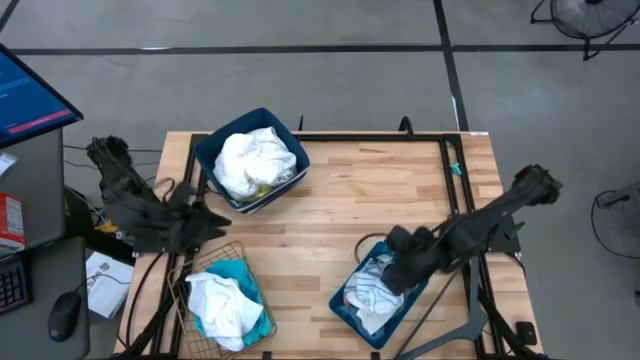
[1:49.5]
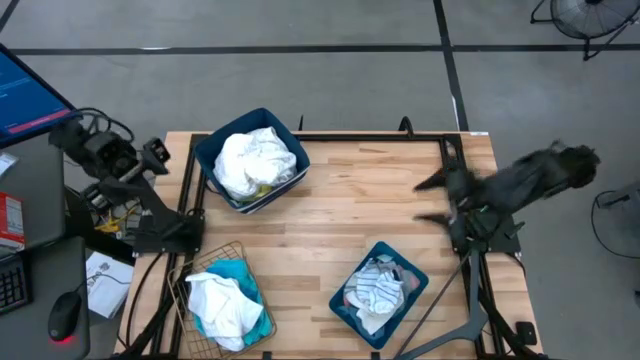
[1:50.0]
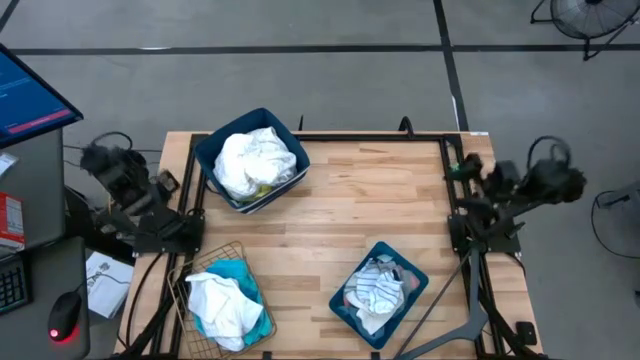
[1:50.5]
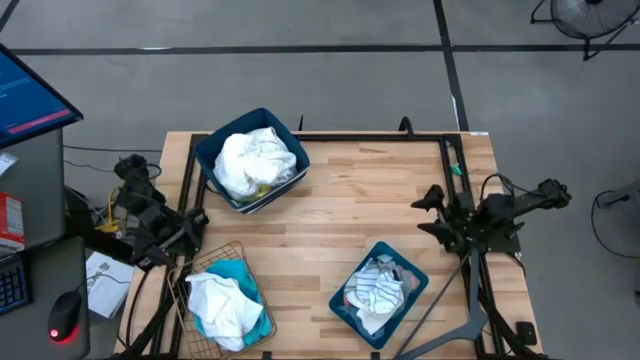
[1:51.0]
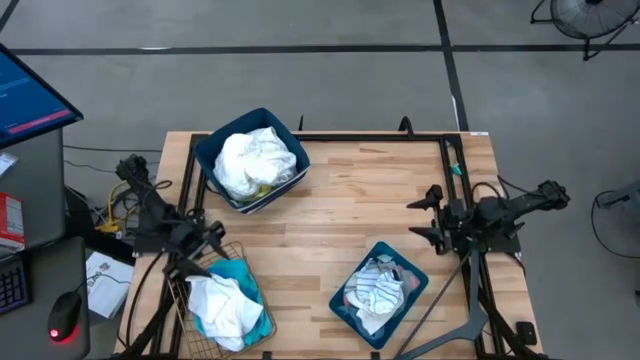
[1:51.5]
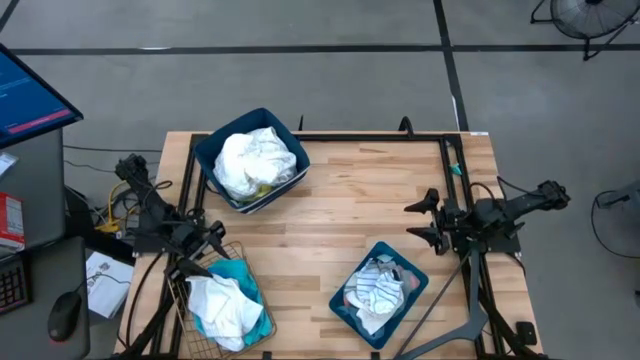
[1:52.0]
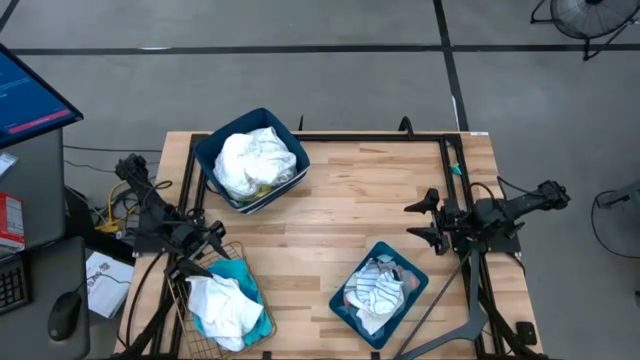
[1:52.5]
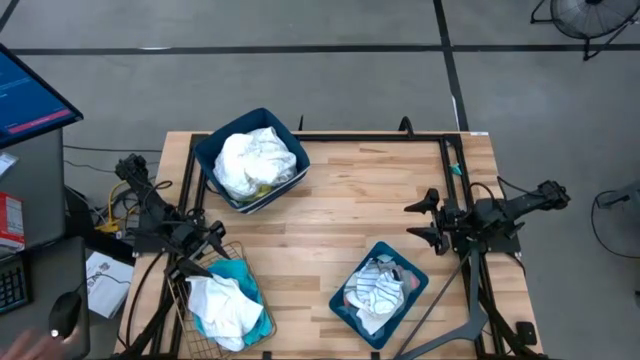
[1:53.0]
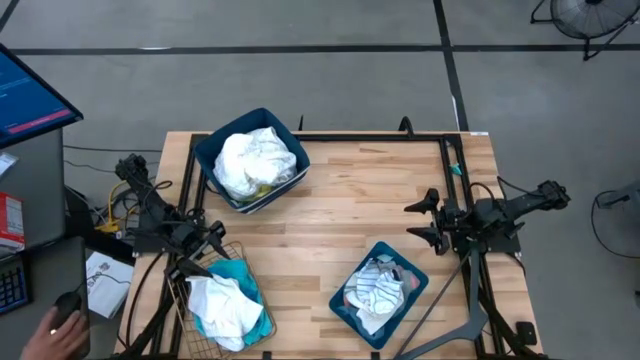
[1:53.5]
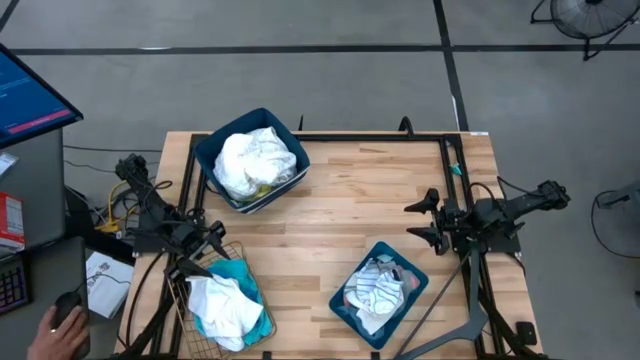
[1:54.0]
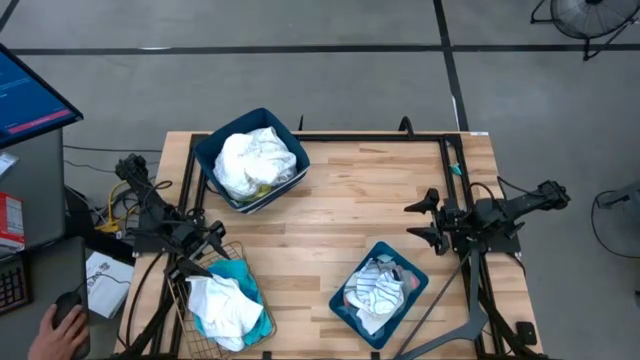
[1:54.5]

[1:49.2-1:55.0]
Task: Pick & Place Cloths
Return to Home Position

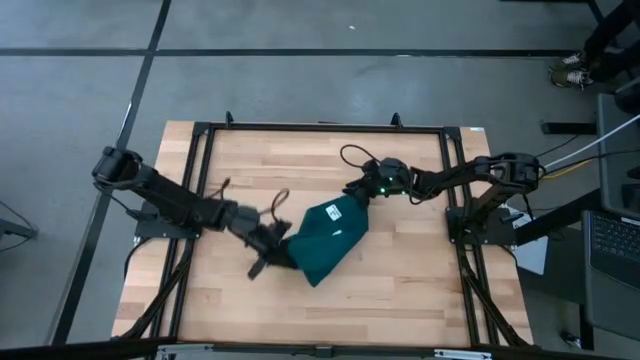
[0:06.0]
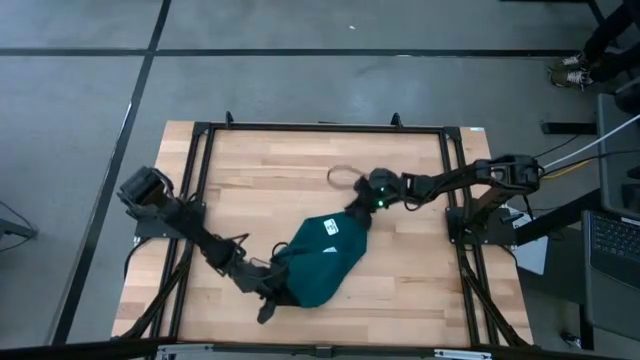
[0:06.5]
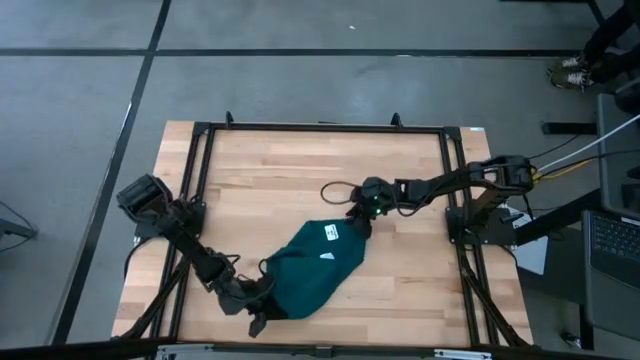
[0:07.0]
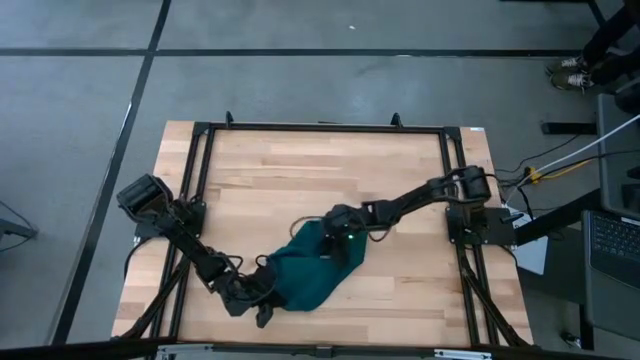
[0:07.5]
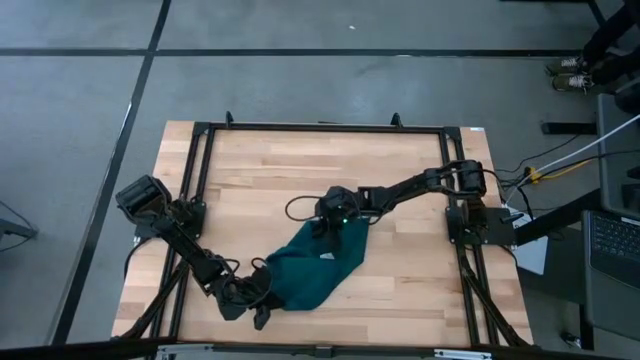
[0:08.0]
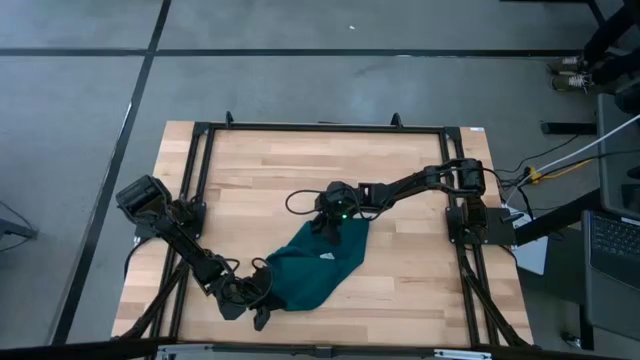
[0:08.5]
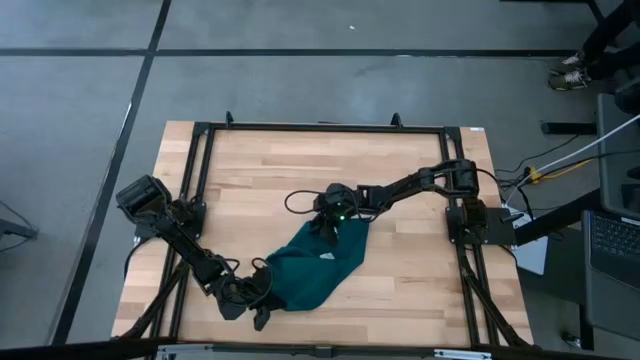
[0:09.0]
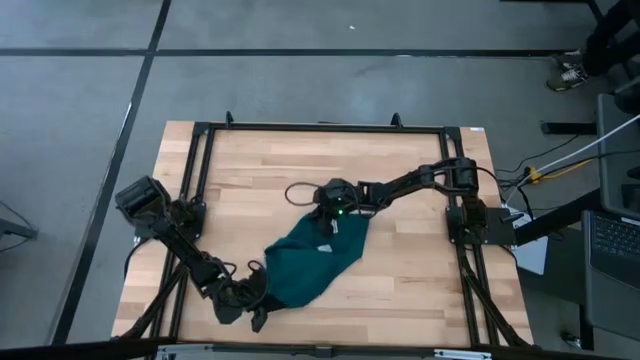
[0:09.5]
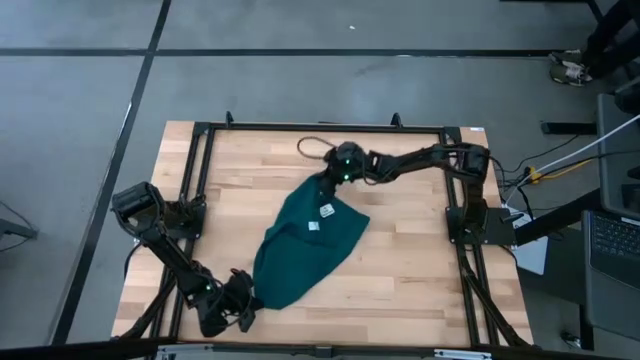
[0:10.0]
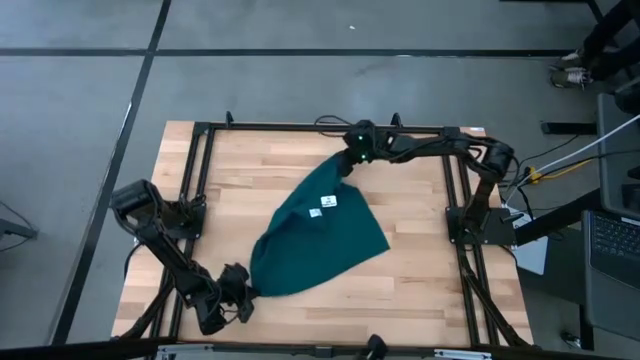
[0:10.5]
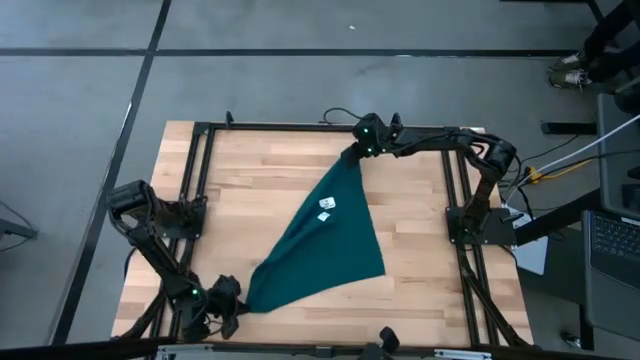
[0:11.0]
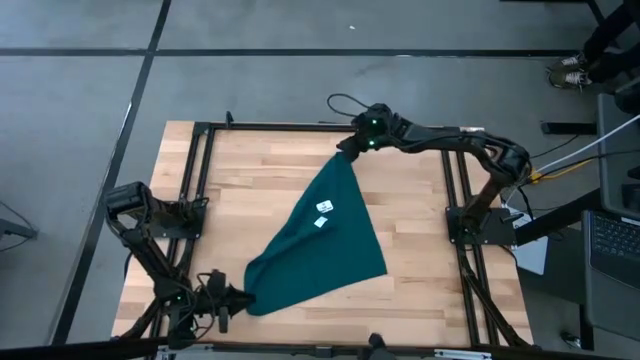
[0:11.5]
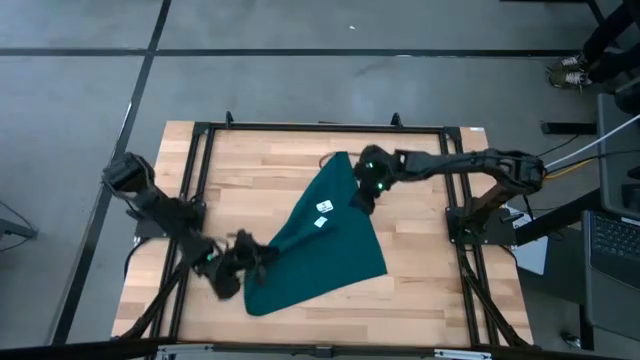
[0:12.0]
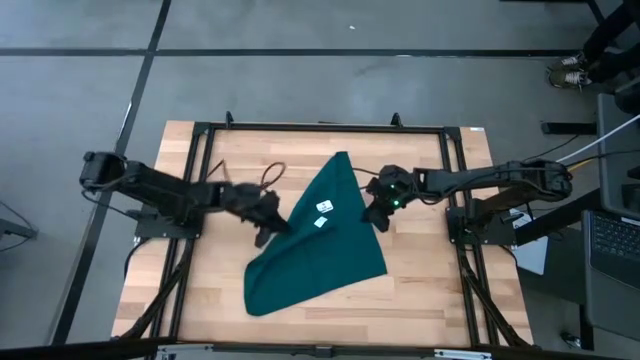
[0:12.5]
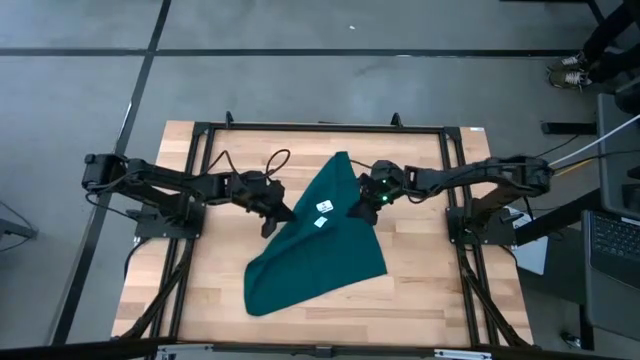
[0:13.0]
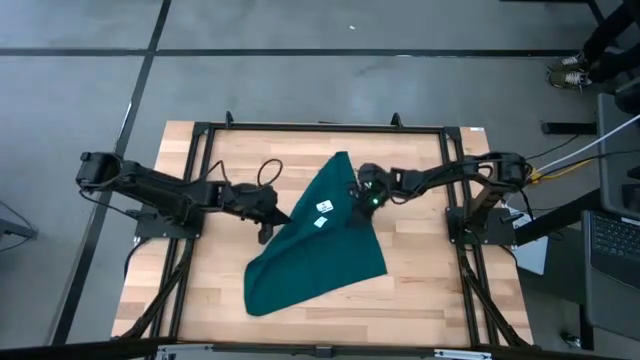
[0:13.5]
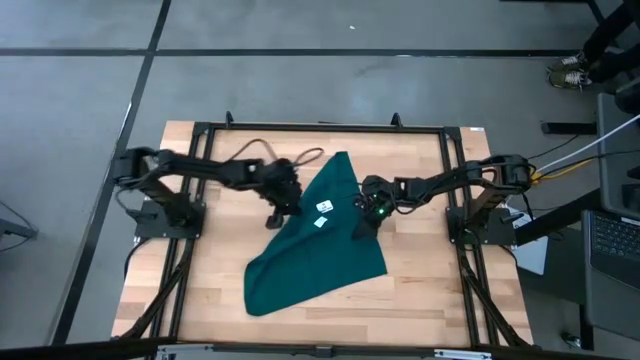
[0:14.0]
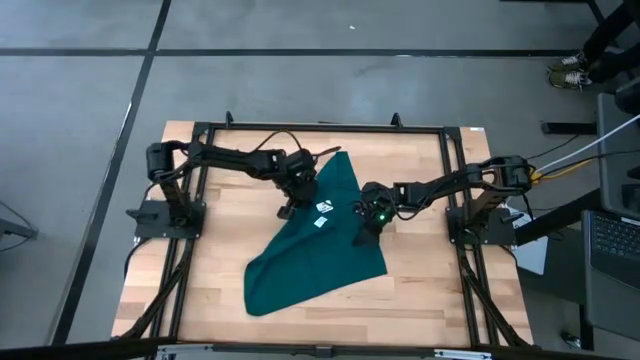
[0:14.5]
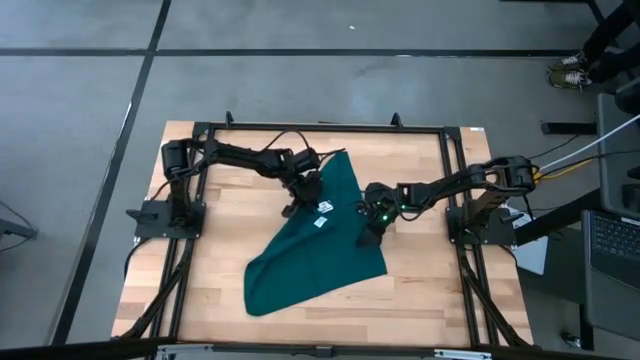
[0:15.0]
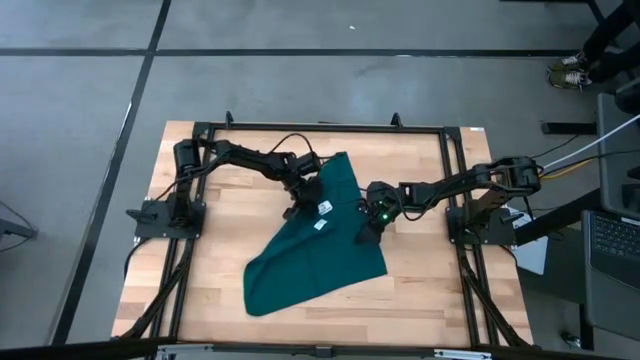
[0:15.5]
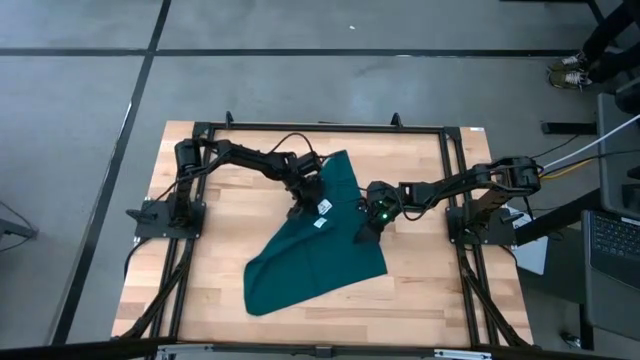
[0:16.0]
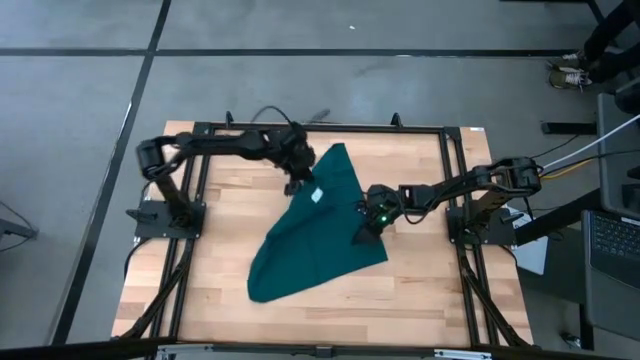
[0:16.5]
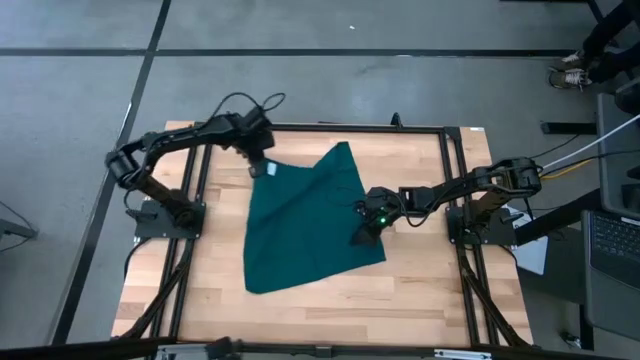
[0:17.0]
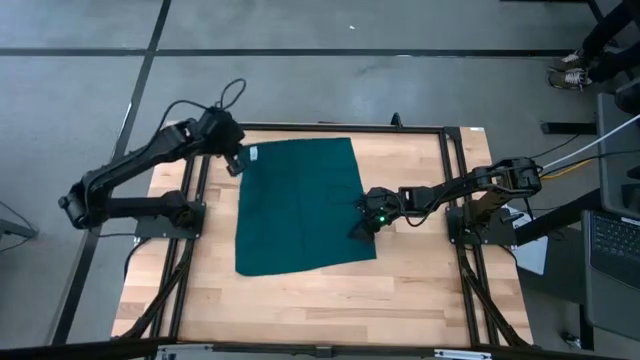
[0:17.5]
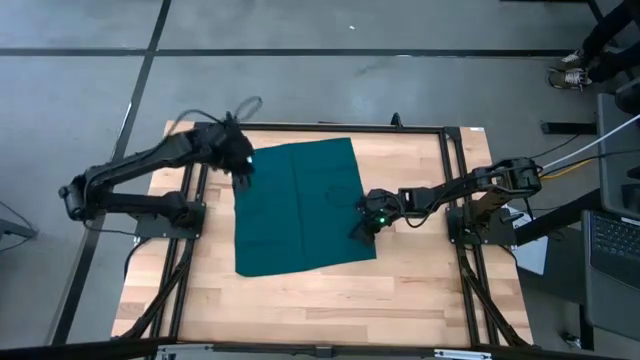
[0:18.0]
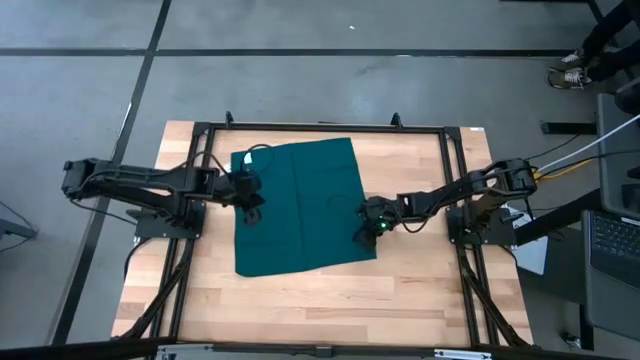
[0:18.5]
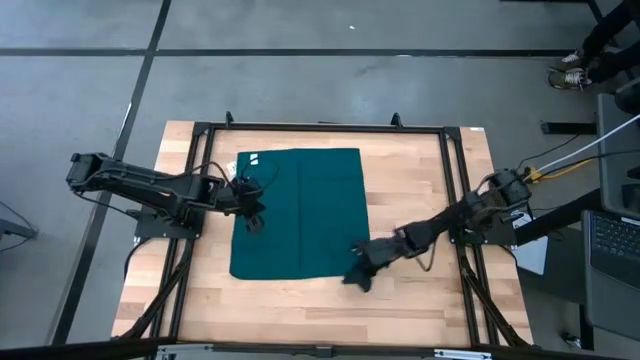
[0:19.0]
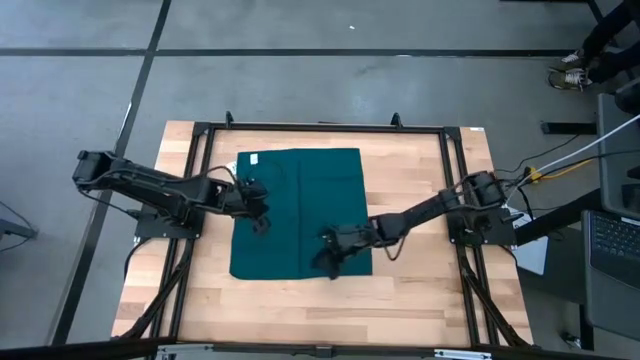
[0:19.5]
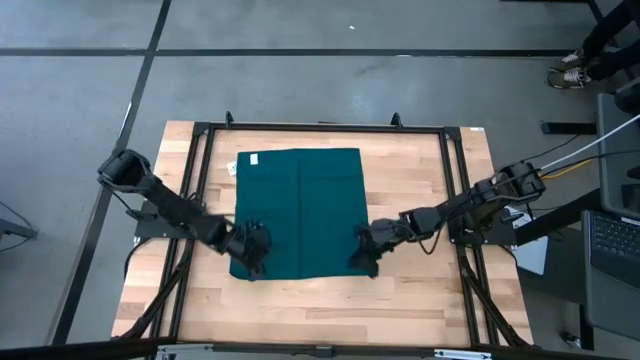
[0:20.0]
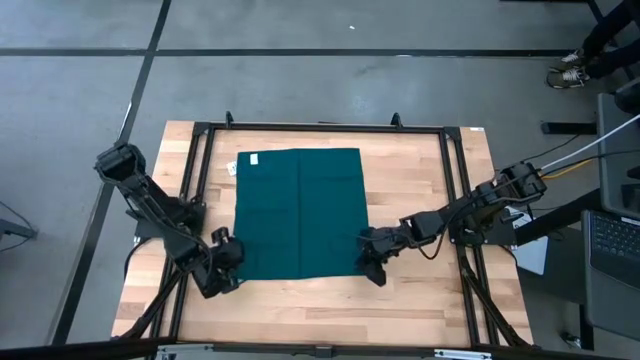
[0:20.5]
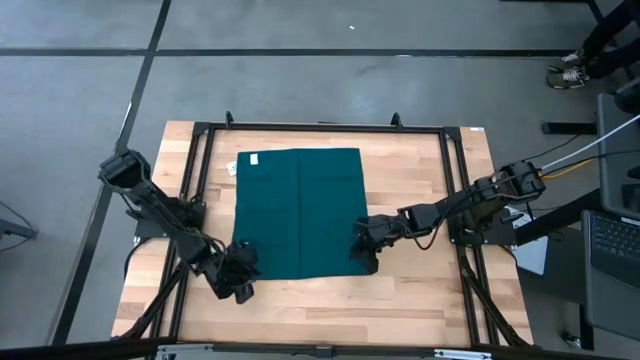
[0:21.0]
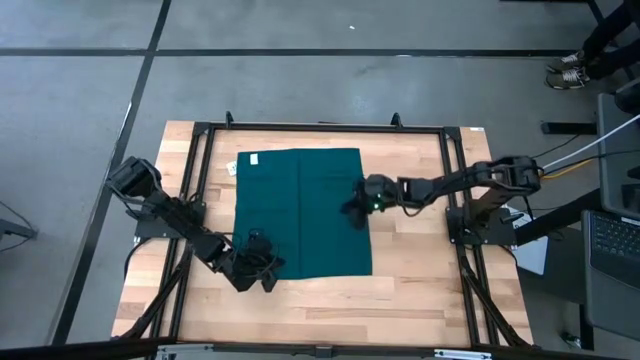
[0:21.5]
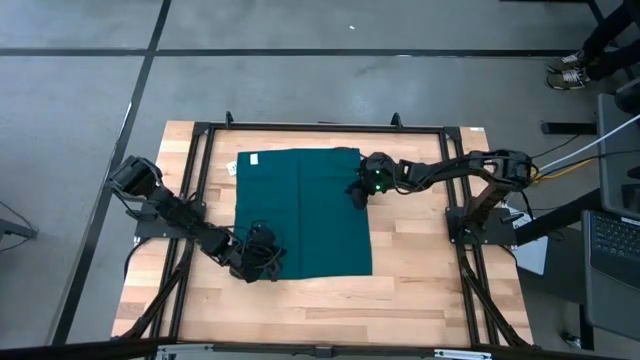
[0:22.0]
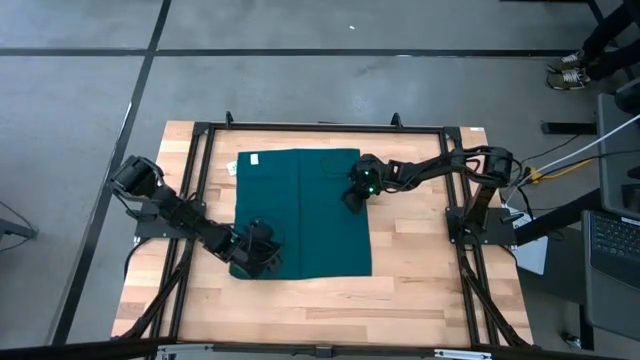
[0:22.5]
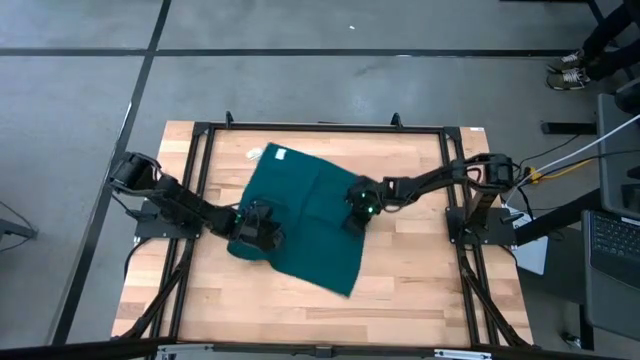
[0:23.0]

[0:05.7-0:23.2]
Task: Fold microfiber towels
Fold the blue napkin
